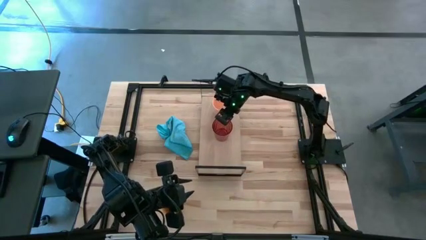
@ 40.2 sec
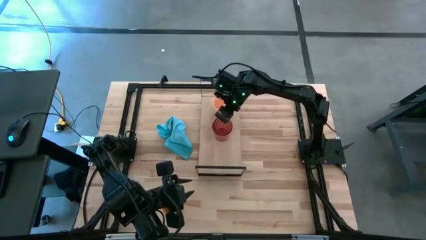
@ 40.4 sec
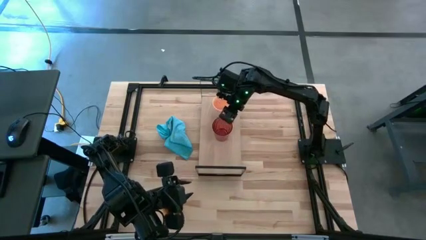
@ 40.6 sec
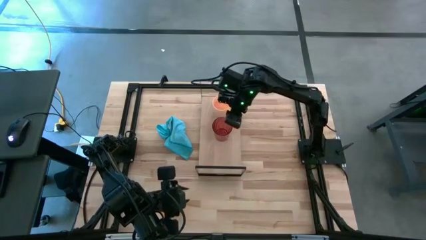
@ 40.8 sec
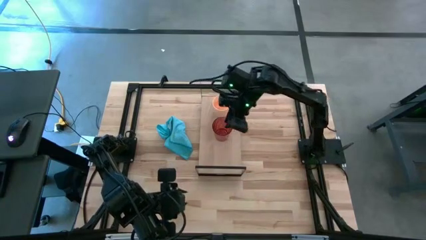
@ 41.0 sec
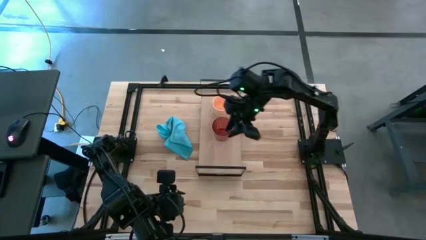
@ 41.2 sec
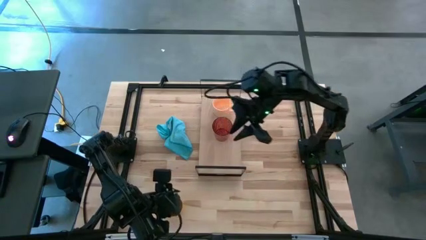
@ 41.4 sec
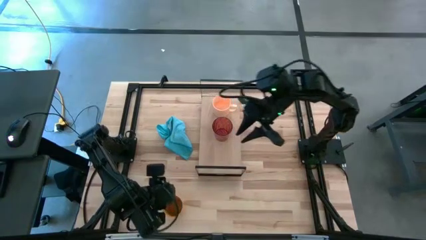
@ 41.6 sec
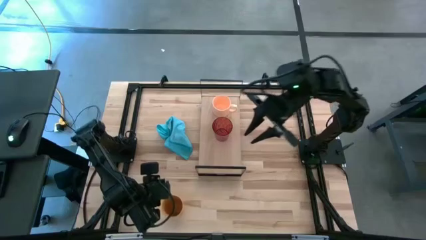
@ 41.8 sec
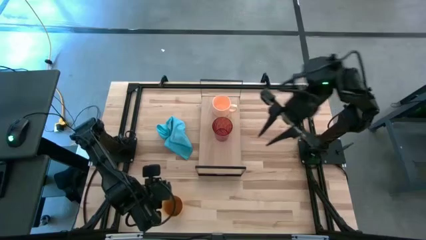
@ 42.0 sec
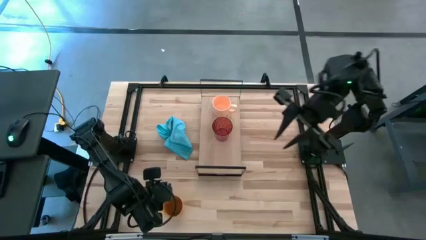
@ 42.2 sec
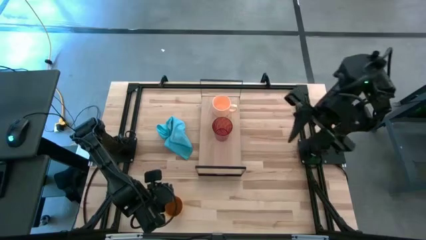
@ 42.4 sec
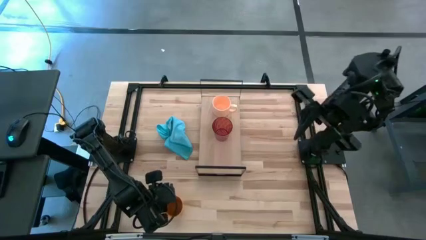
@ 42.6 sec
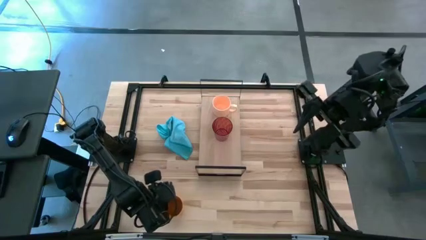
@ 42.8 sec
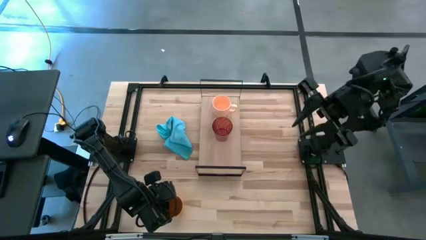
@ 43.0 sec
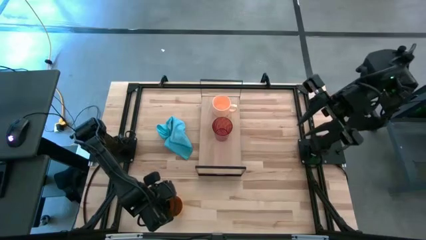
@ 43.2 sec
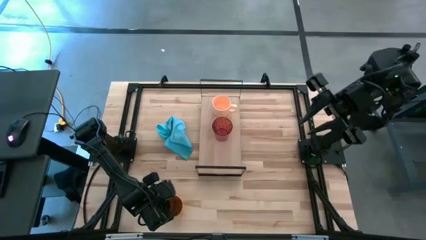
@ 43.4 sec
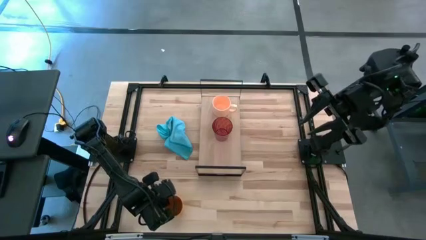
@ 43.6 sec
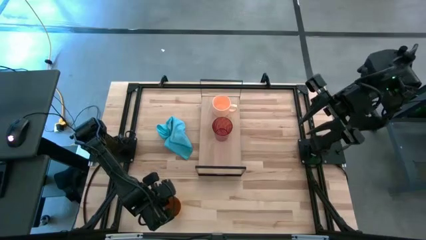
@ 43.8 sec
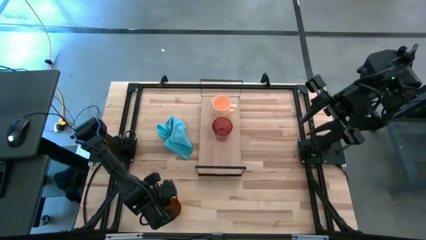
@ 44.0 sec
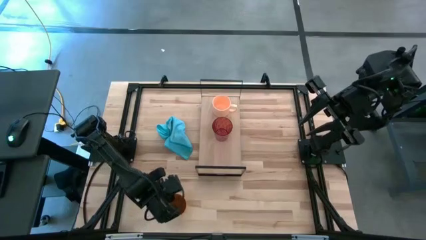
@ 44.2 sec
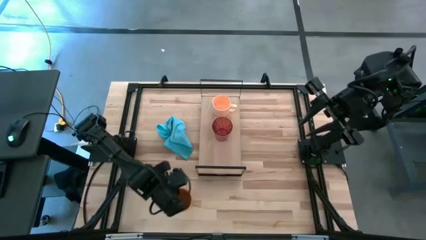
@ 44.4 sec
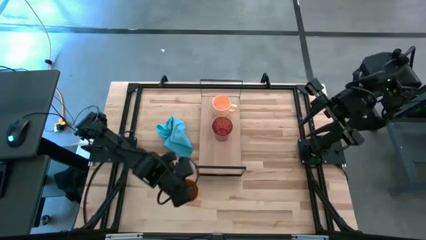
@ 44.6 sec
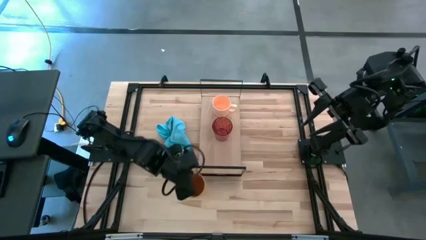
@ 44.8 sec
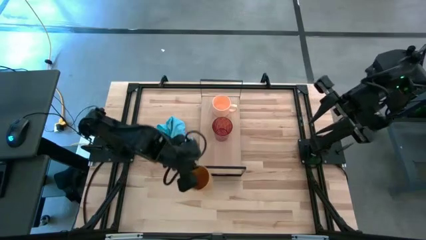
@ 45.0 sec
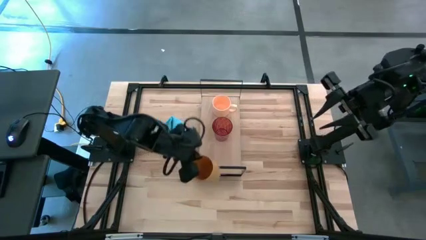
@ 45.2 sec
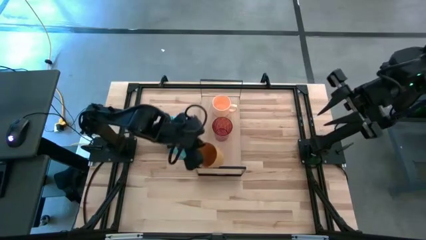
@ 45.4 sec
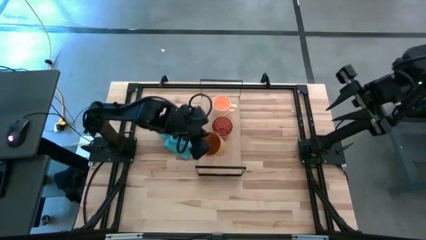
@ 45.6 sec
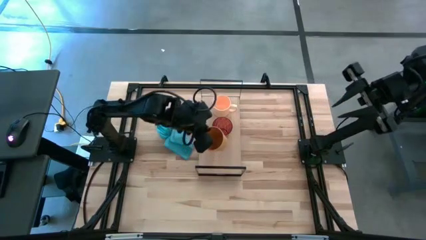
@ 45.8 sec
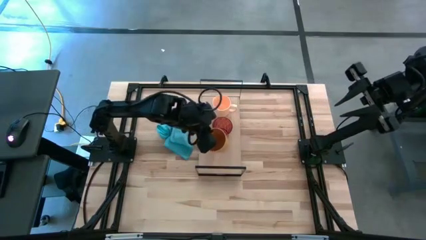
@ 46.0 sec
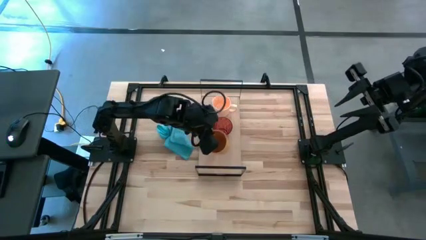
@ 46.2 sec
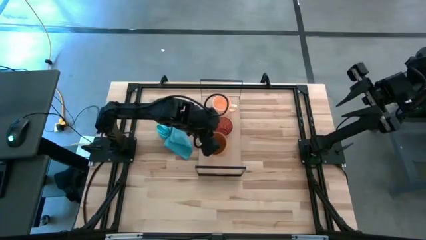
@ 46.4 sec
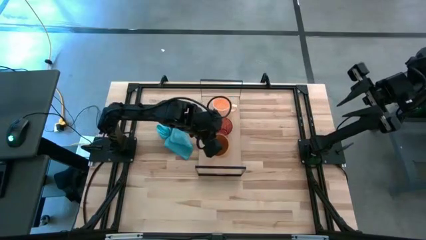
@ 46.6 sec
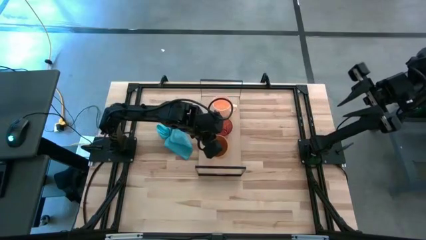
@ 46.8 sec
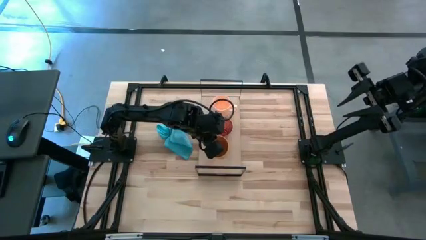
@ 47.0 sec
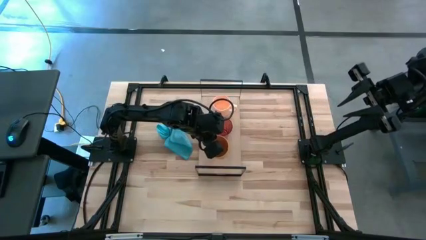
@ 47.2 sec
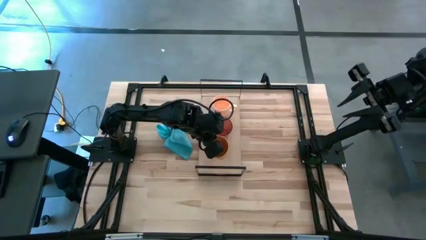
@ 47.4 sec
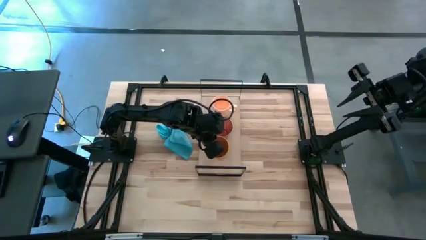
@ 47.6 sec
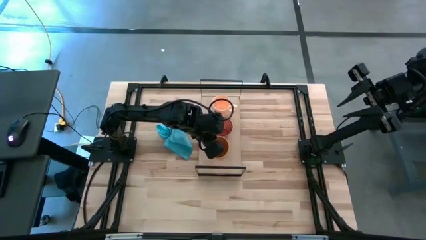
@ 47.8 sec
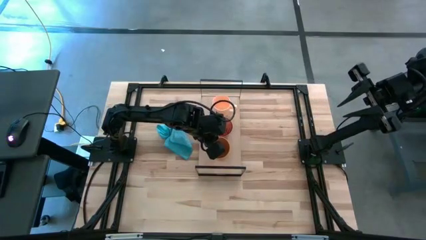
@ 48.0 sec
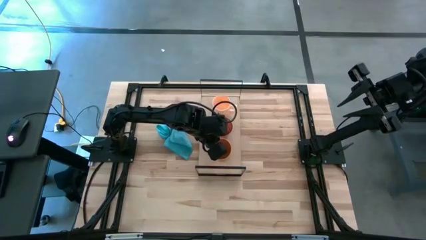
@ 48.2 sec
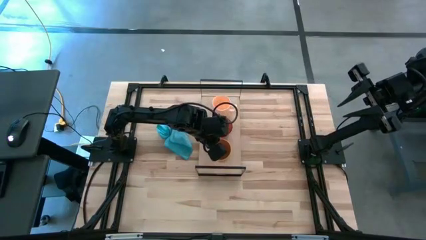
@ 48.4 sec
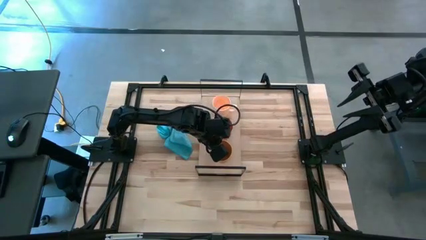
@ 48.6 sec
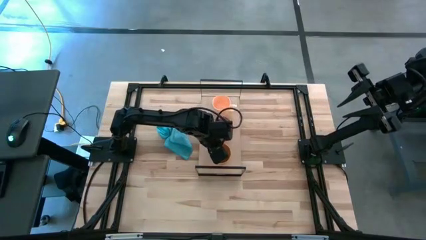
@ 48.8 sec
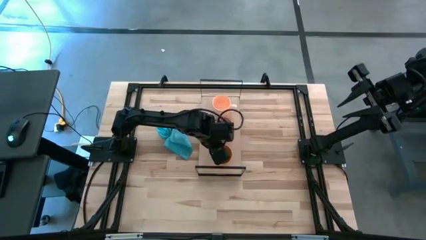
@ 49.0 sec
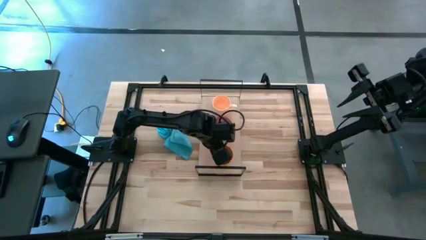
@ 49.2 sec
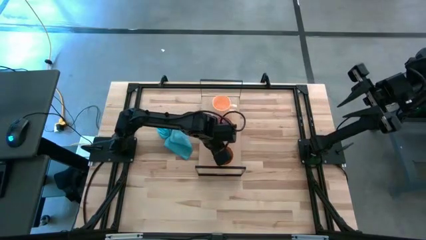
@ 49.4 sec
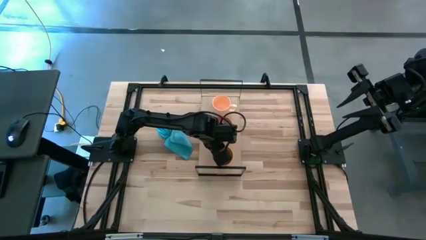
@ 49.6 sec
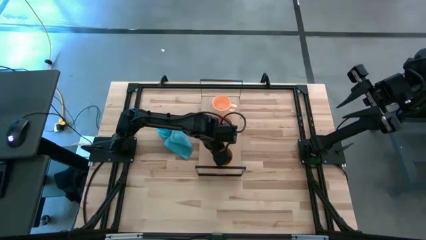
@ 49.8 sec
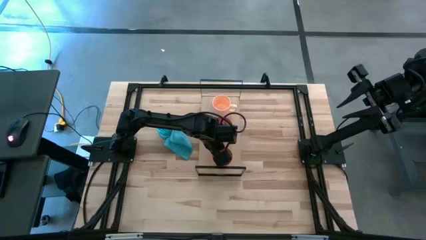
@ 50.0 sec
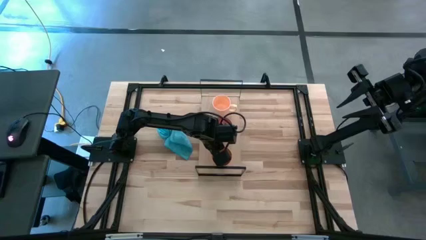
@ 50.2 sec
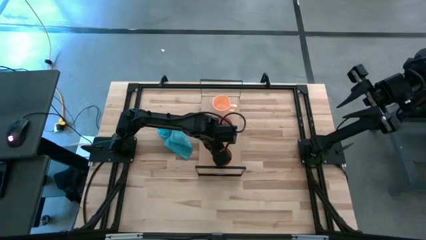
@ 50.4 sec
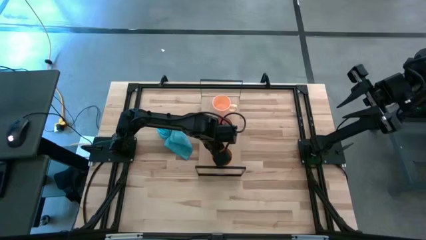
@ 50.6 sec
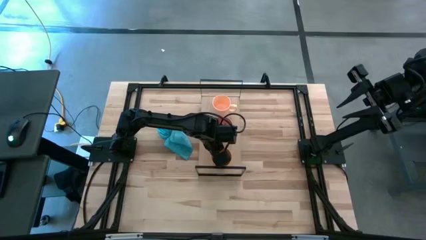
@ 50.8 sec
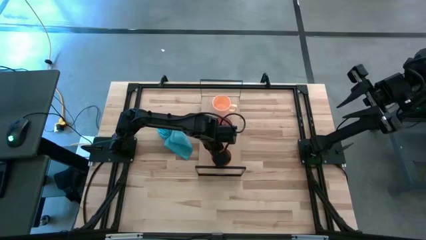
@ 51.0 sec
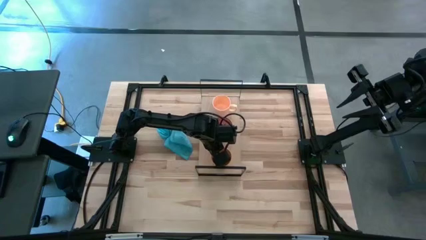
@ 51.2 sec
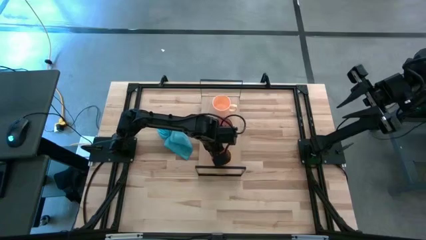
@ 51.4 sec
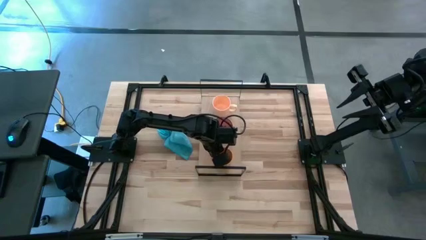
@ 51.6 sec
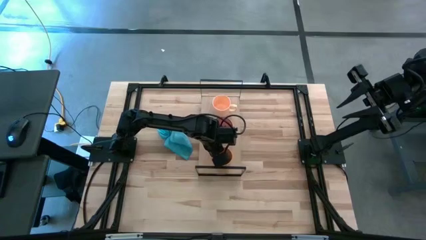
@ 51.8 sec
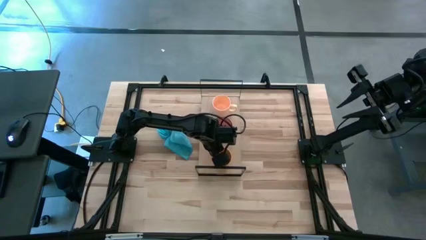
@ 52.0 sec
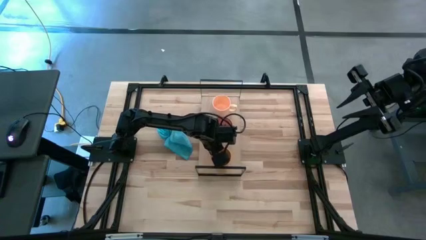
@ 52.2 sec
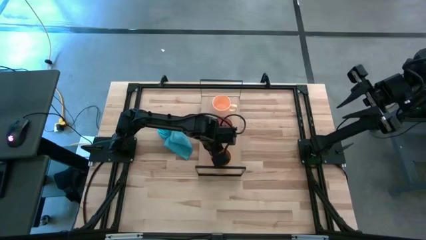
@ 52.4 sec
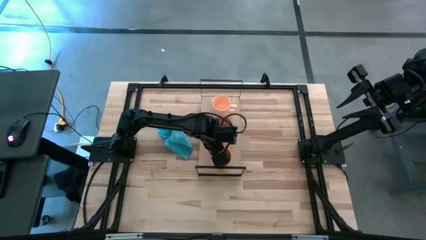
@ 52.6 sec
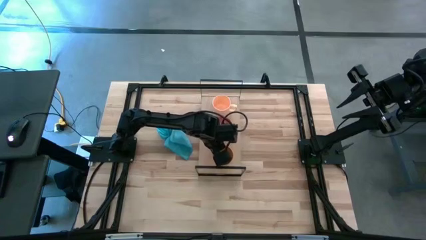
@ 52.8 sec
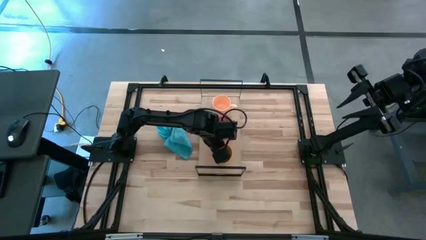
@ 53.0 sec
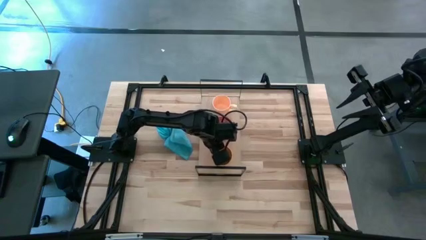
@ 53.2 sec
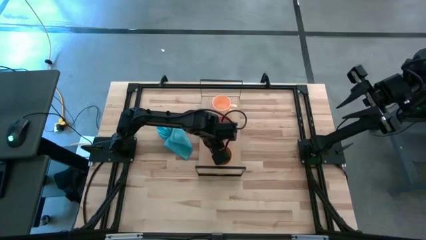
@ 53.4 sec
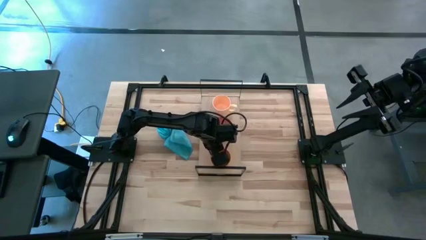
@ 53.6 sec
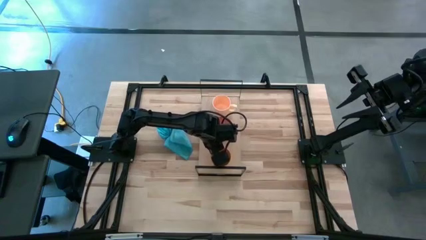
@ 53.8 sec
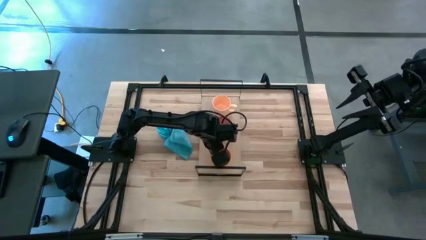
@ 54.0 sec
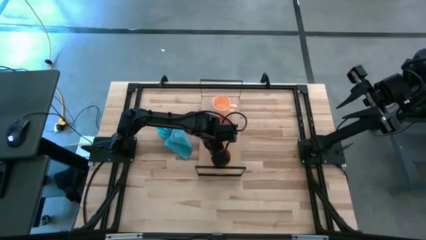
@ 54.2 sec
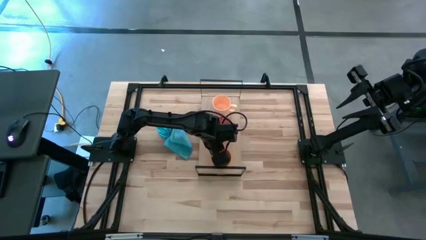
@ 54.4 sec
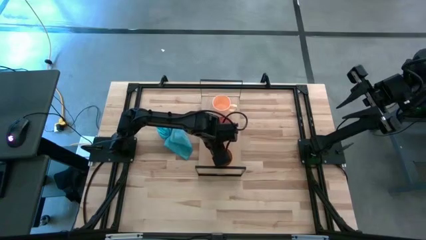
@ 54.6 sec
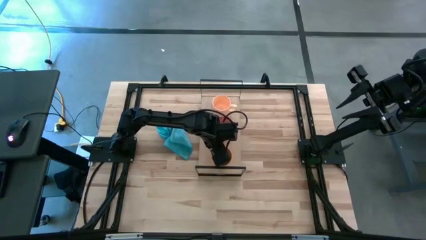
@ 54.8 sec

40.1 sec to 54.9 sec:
Task: Stack small to large cups/mugs on shelf
Put the yellow cup on the shelf
